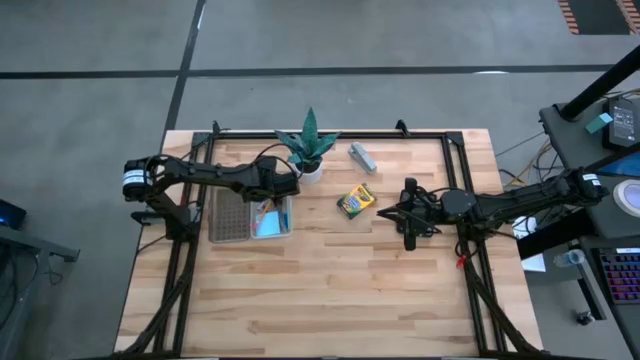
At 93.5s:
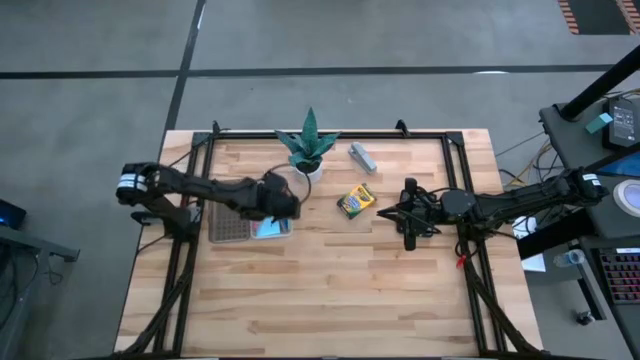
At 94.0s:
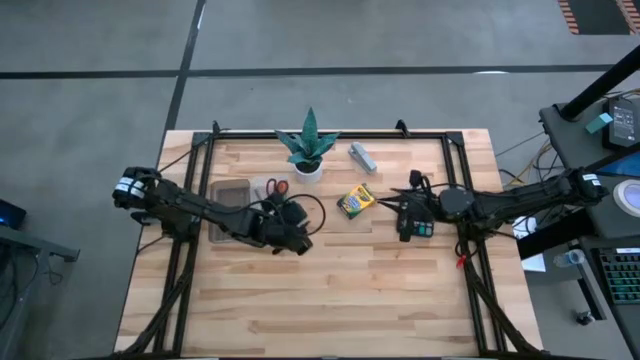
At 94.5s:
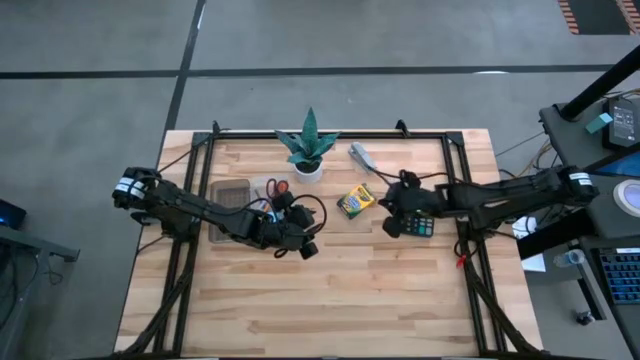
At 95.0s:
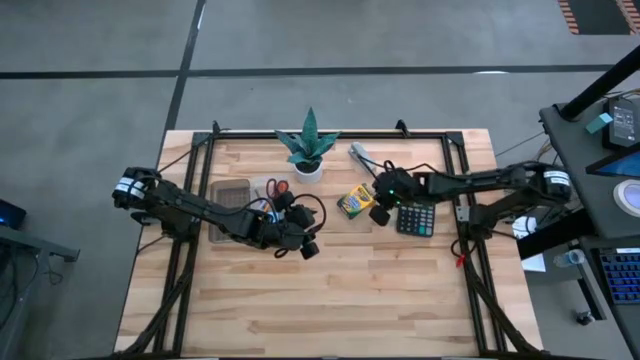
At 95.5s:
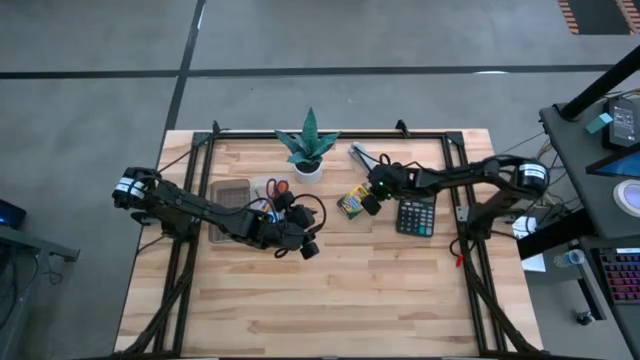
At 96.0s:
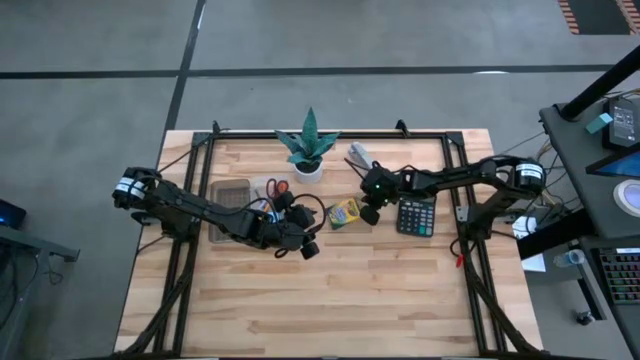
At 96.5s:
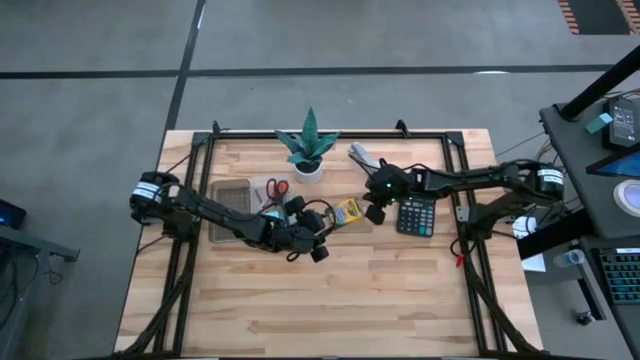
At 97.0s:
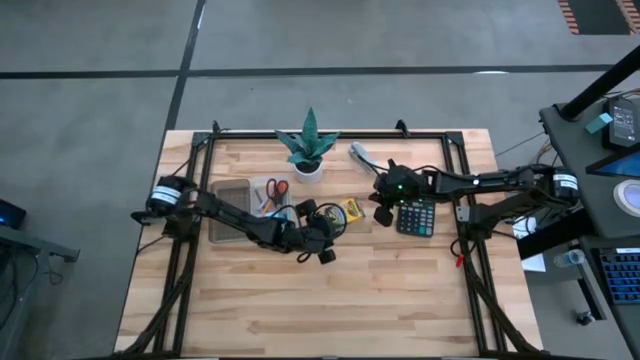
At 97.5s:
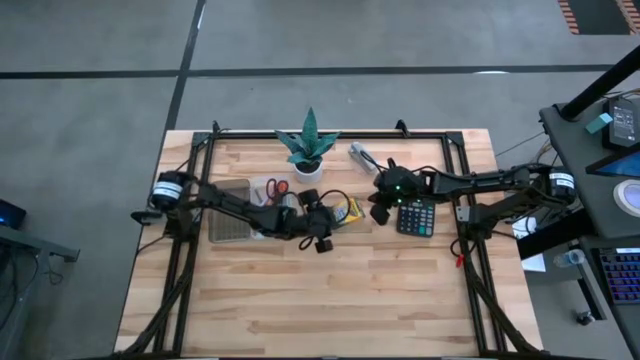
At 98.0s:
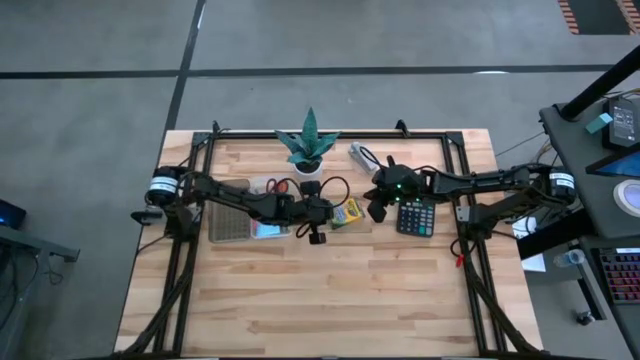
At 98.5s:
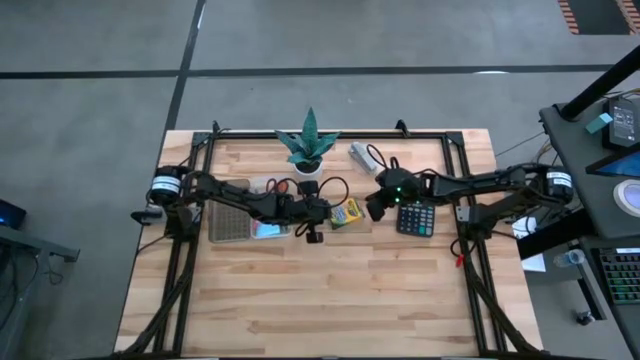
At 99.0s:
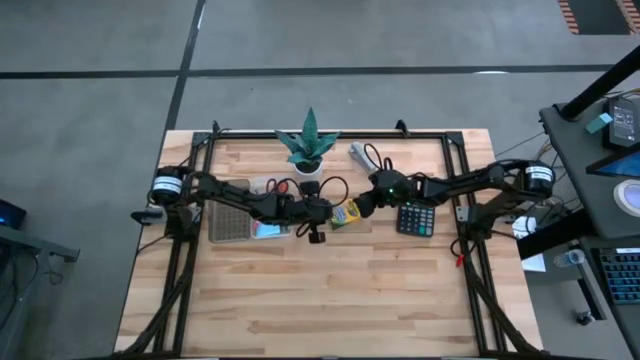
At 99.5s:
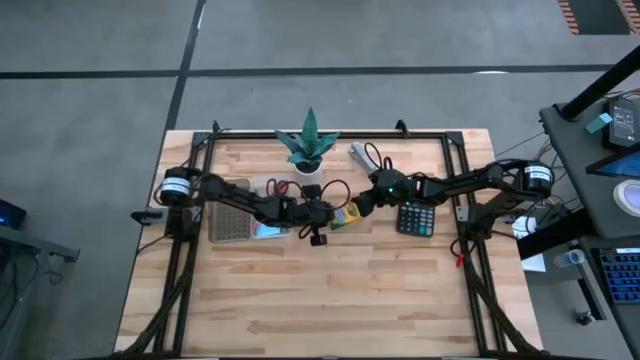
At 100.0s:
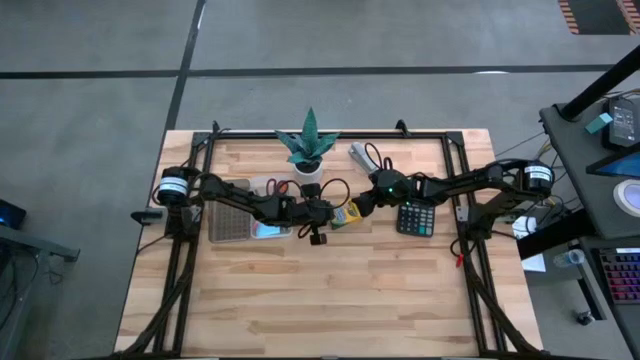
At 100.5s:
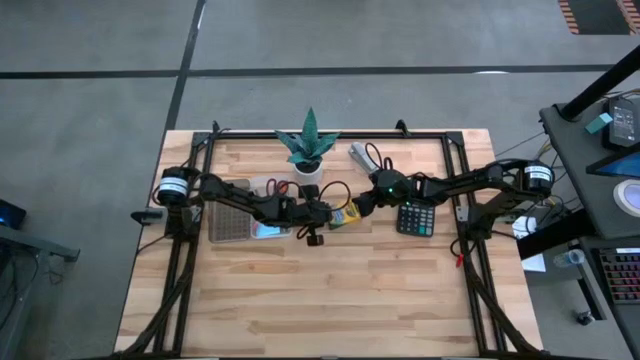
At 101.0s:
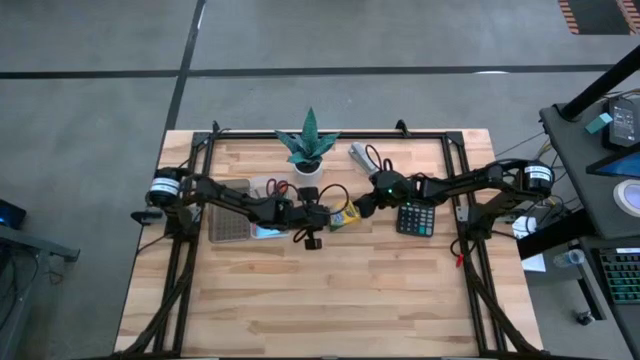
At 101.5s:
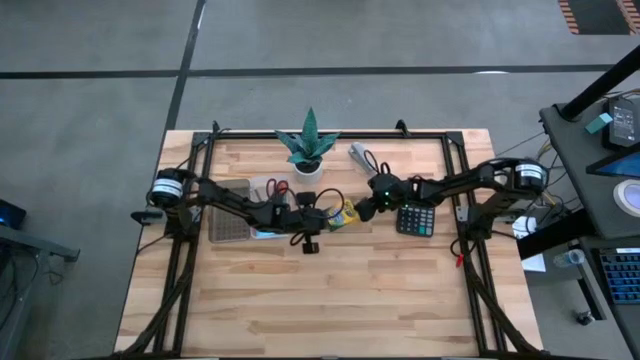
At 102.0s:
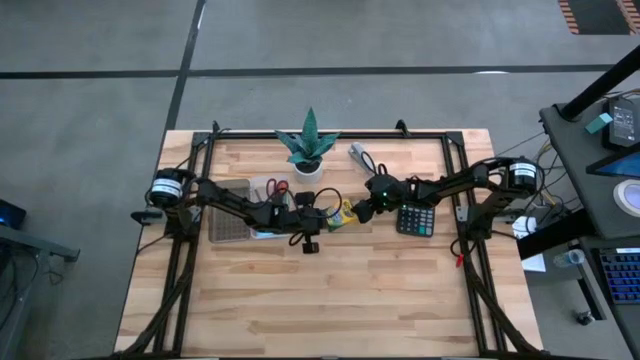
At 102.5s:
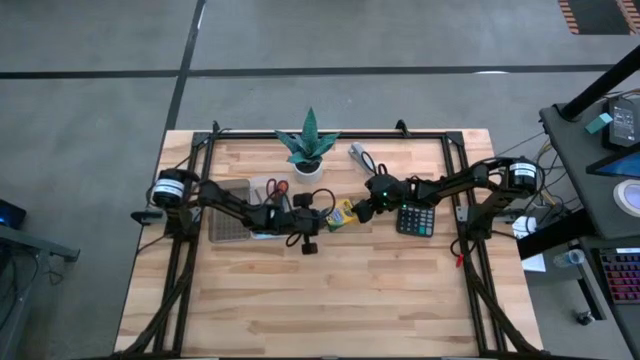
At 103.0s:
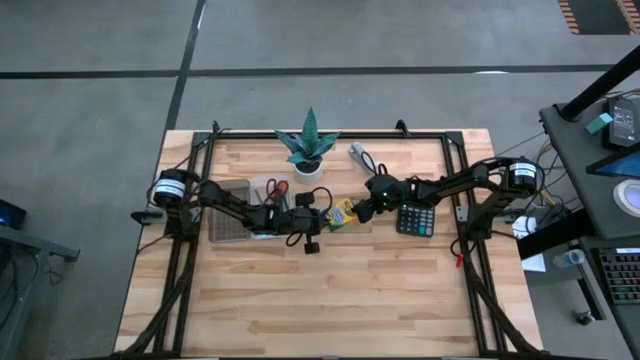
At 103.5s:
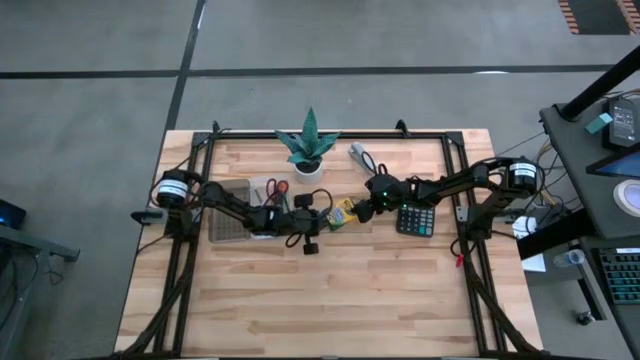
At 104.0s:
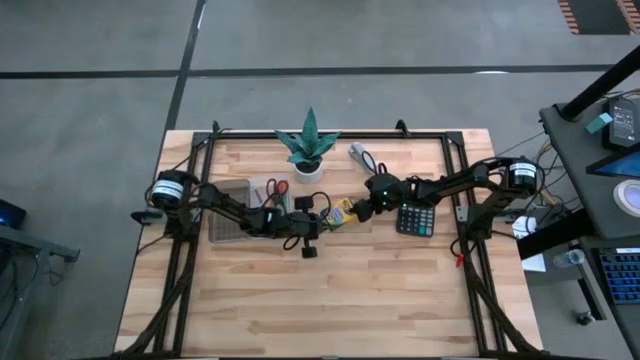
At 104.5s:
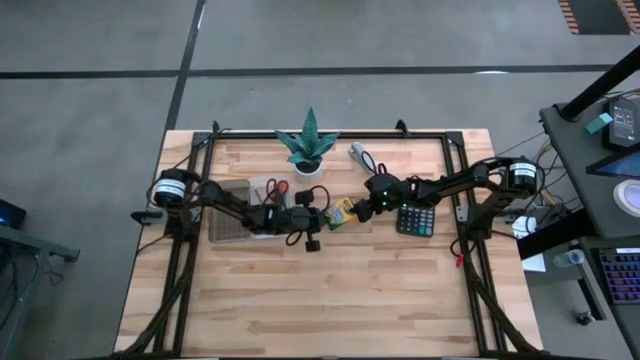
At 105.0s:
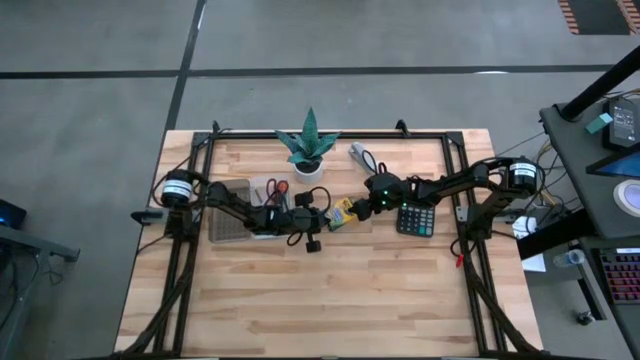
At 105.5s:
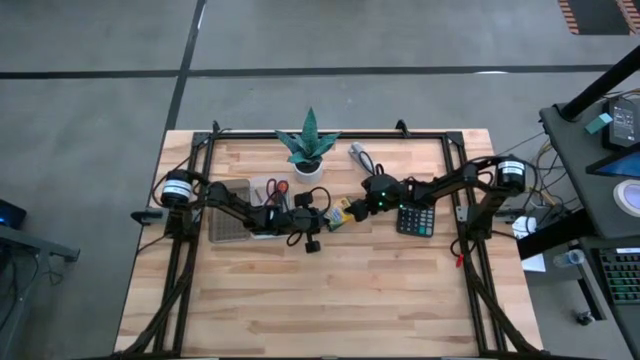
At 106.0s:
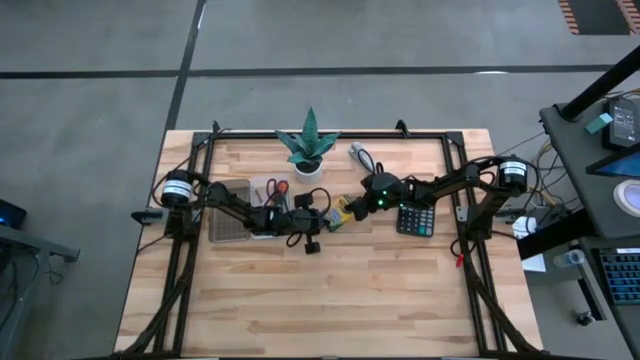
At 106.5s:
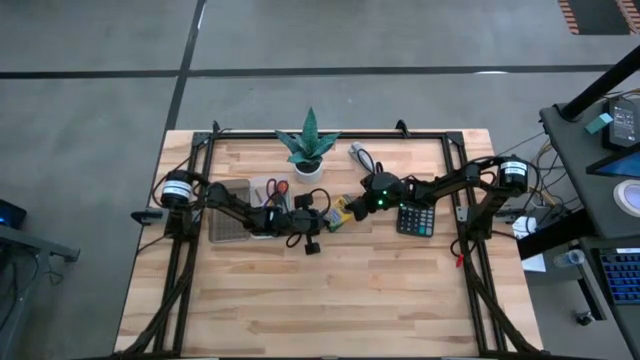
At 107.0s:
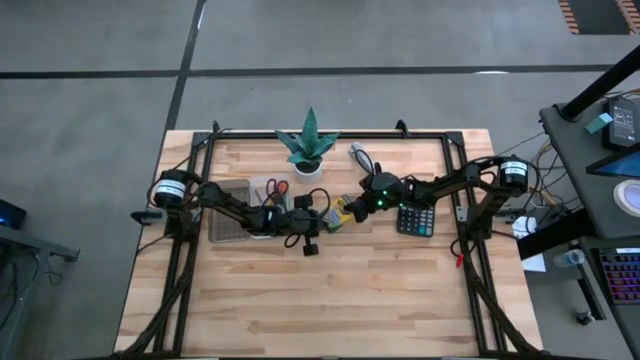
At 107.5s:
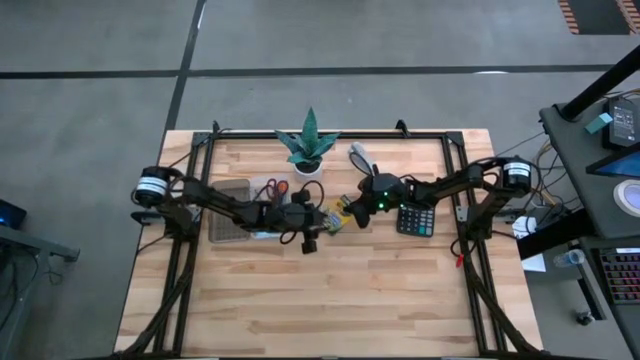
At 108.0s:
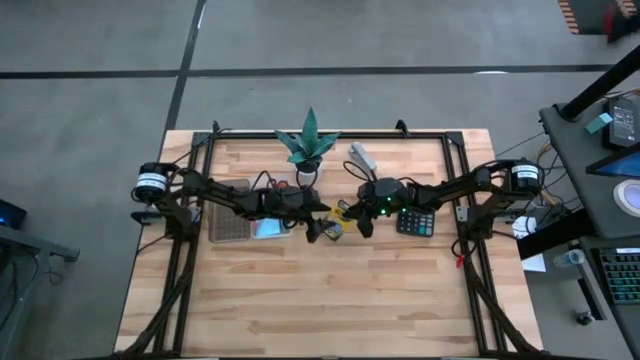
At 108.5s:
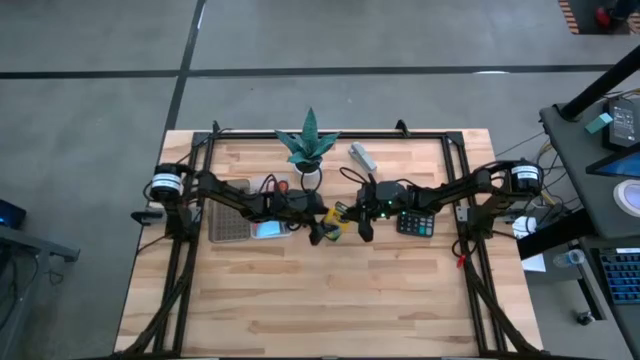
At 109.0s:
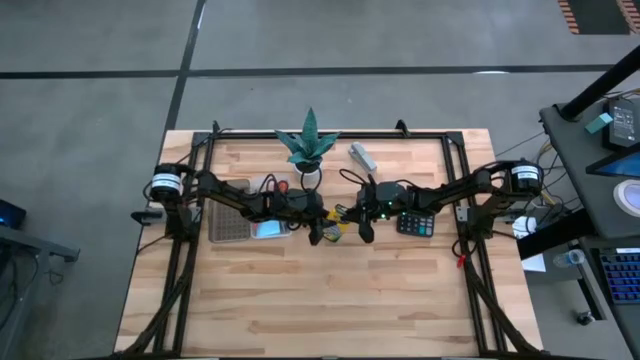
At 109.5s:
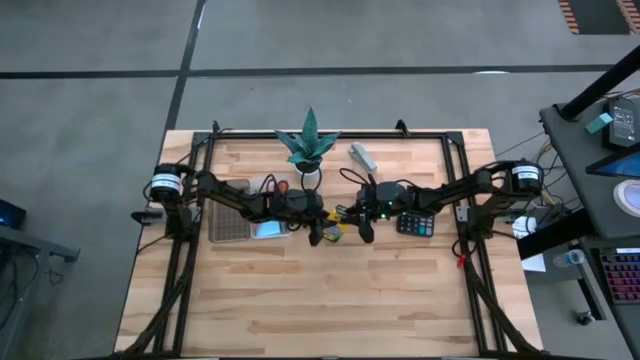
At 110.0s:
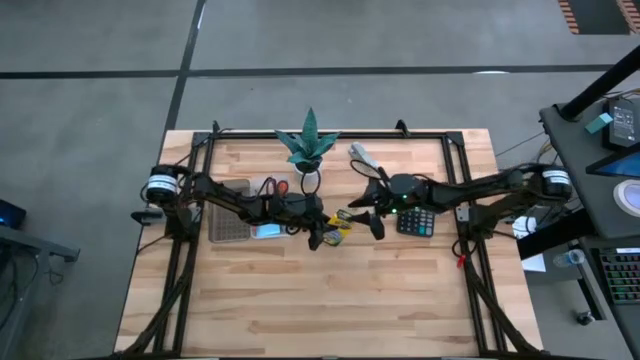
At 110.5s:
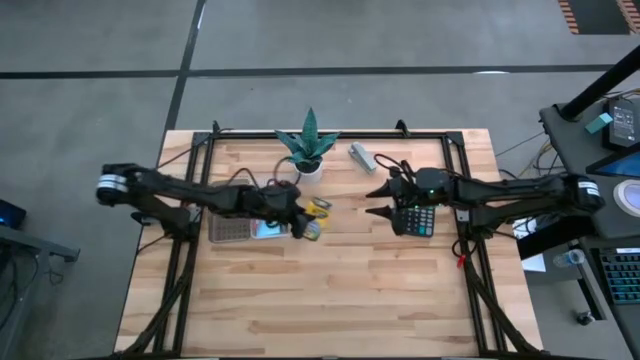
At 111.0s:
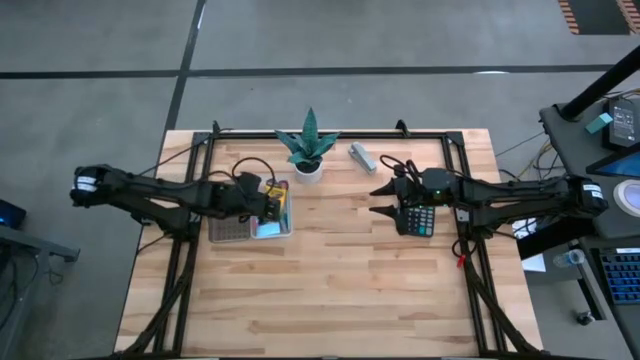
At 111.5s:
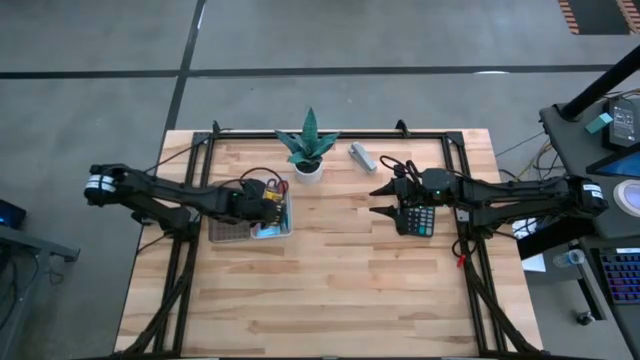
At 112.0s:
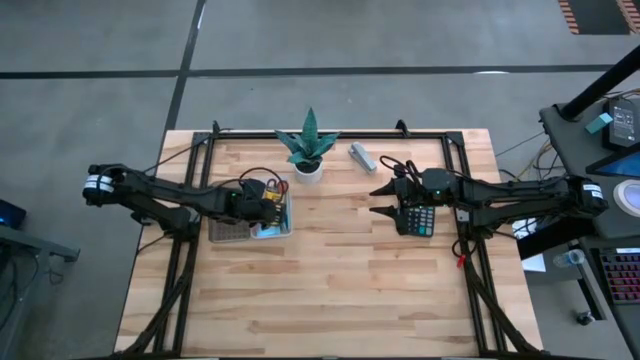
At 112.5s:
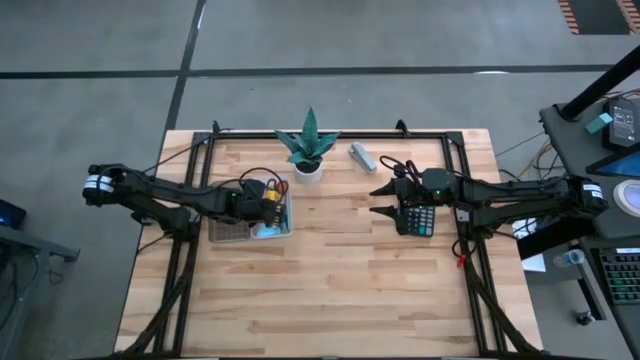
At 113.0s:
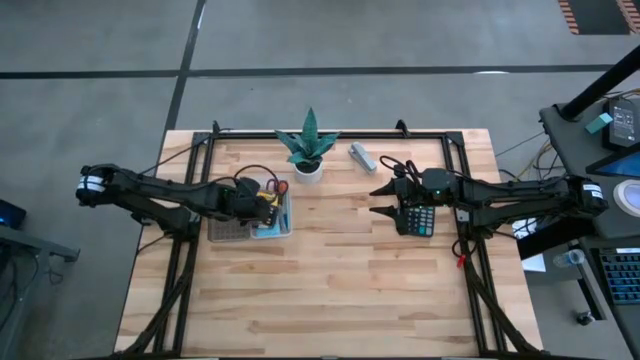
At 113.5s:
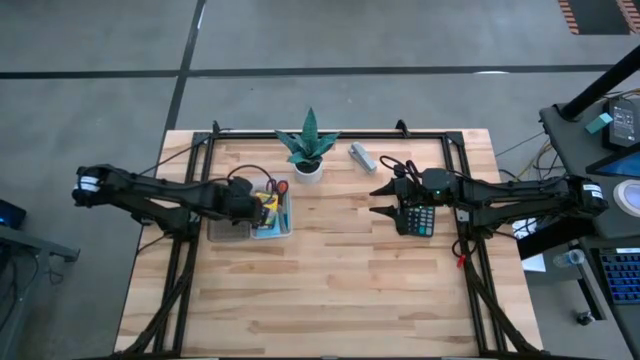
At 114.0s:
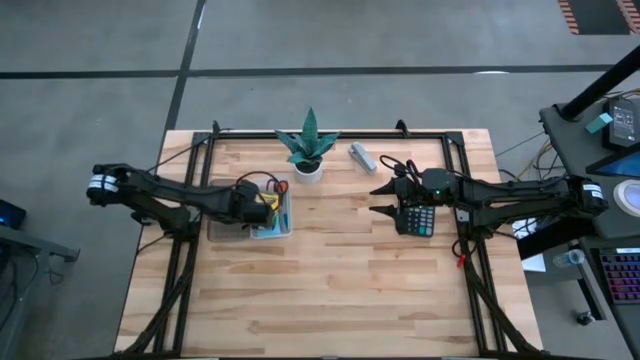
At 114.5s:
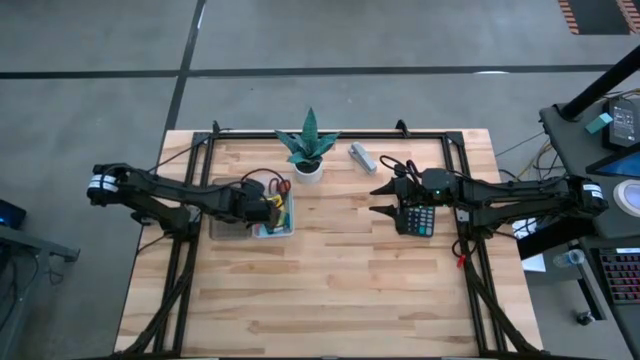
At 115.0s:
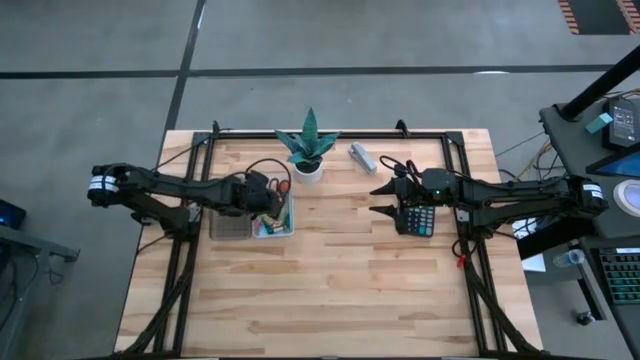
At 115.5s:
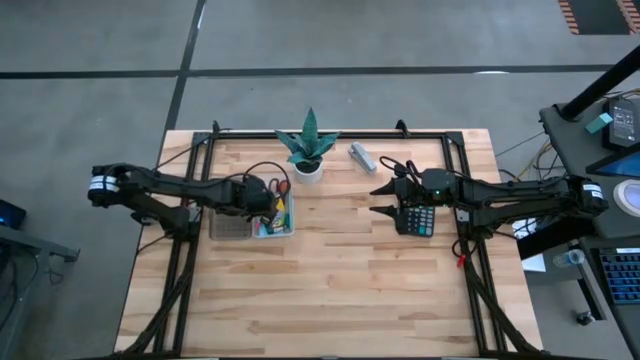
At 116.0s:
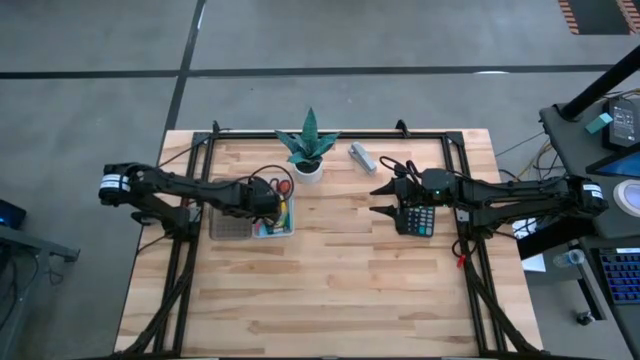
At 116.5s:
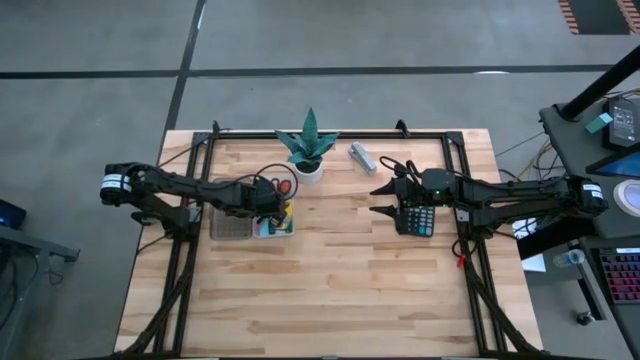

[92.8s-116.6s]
Task: Pack school essentials
Put the yellow crayon box into the white and black box
